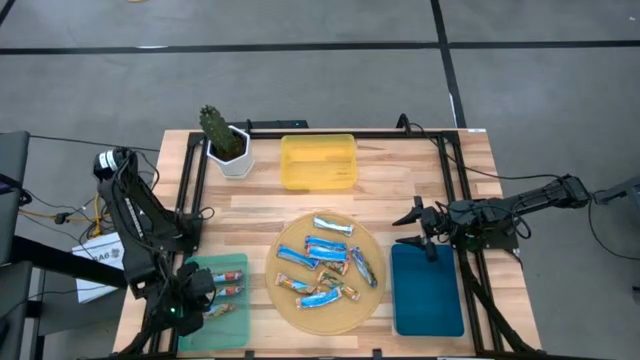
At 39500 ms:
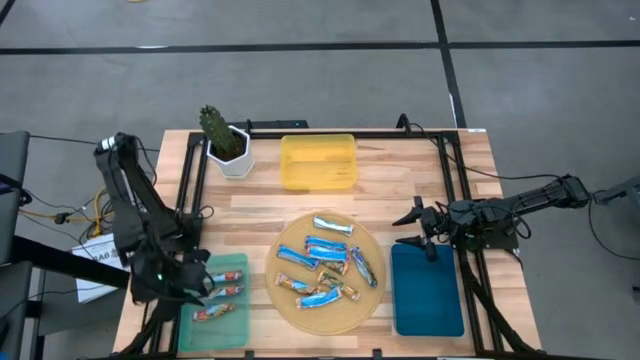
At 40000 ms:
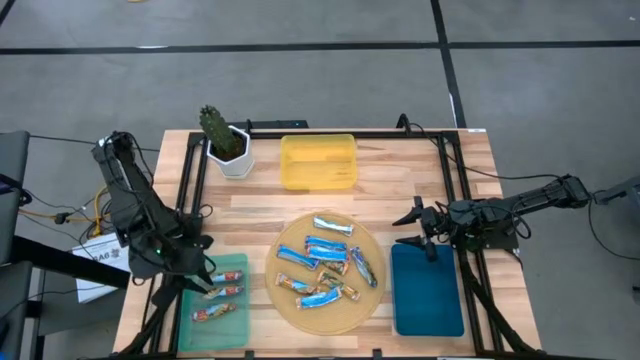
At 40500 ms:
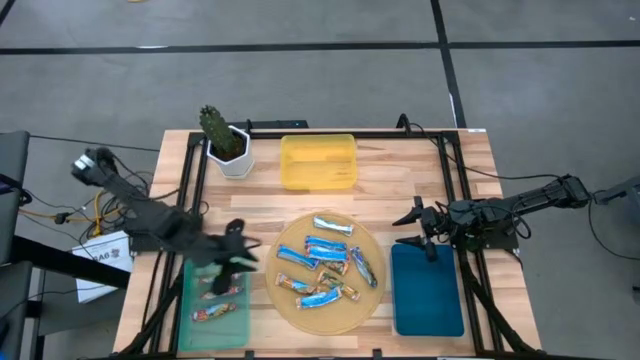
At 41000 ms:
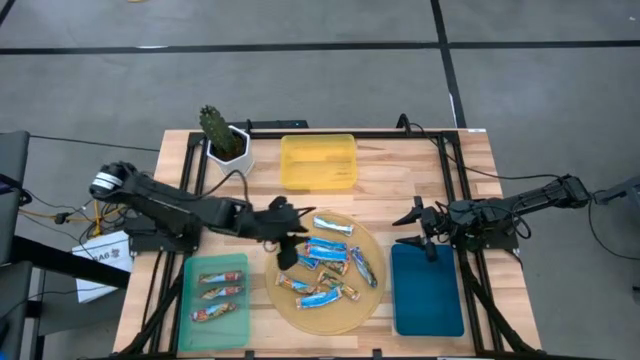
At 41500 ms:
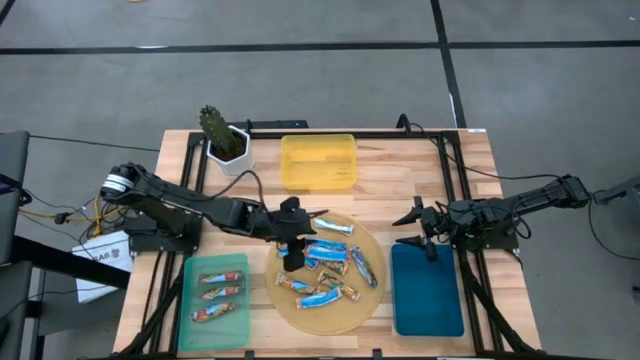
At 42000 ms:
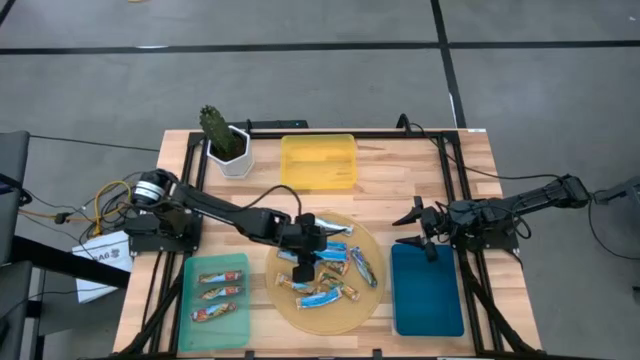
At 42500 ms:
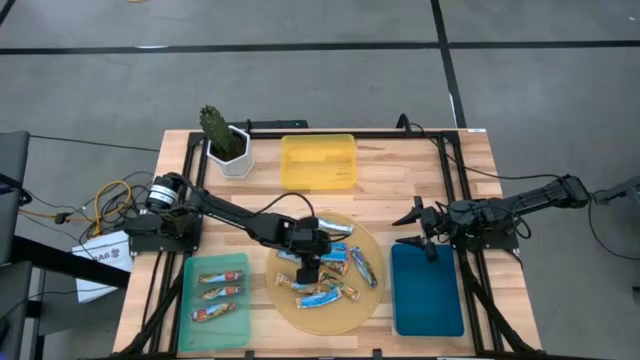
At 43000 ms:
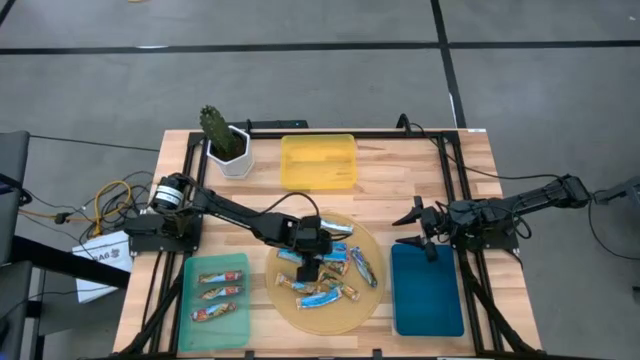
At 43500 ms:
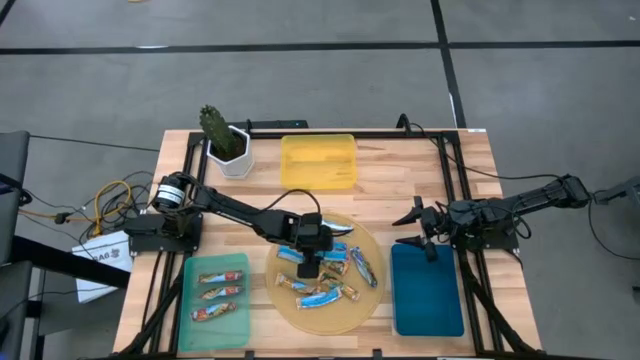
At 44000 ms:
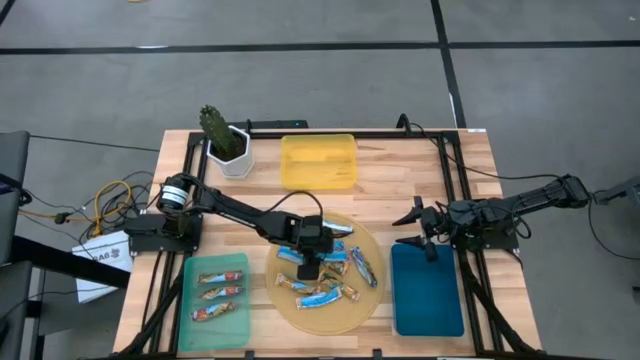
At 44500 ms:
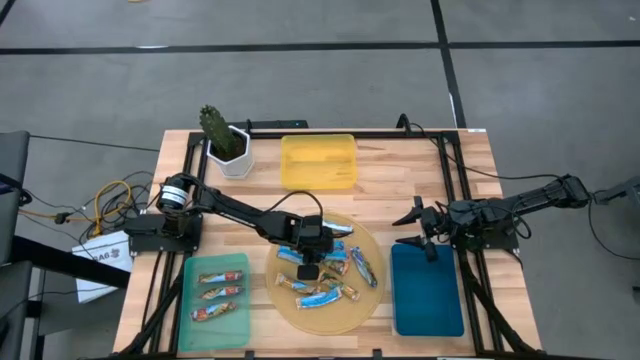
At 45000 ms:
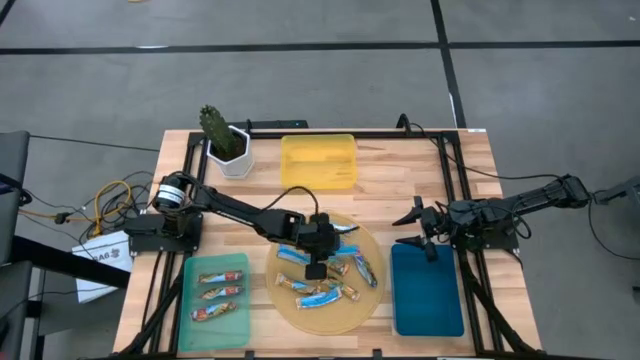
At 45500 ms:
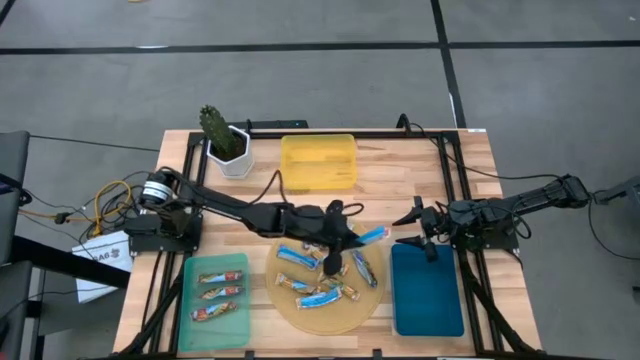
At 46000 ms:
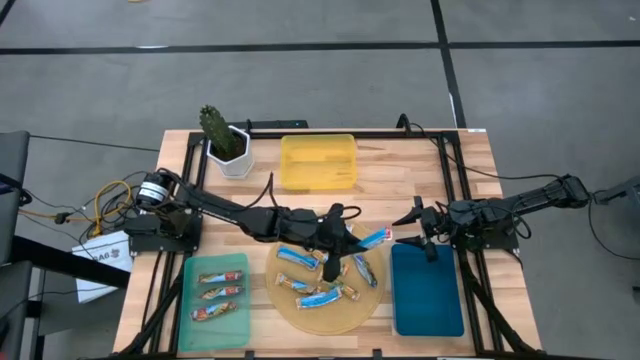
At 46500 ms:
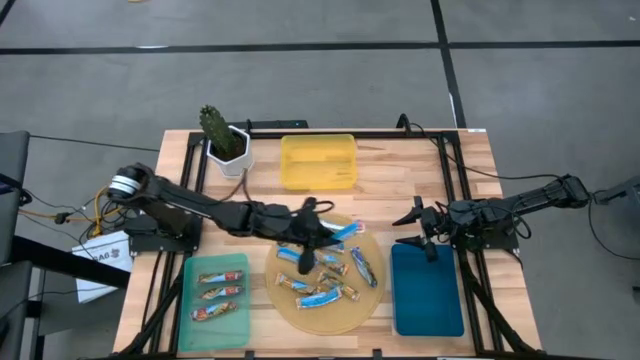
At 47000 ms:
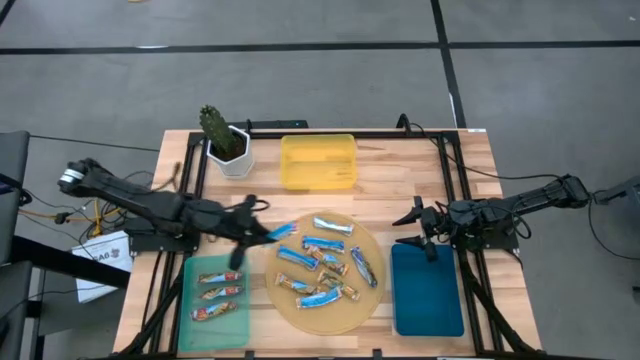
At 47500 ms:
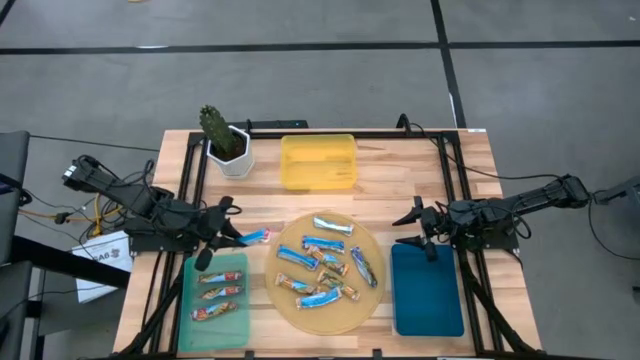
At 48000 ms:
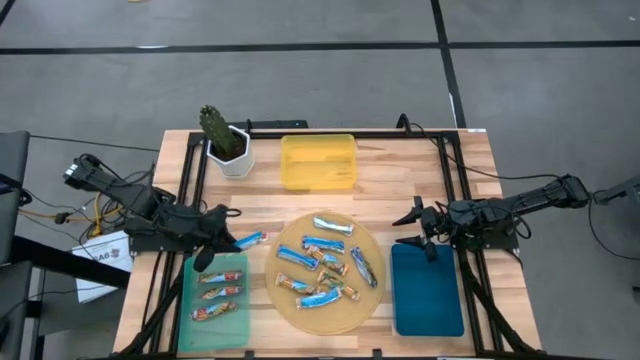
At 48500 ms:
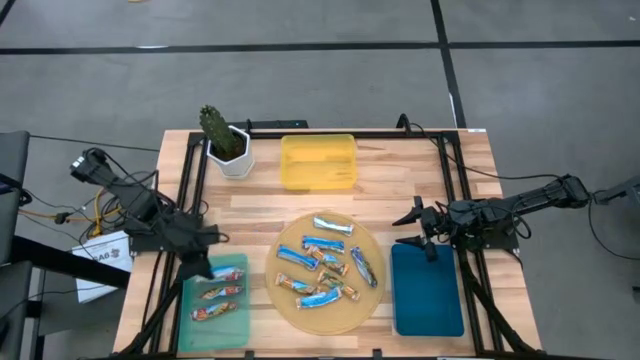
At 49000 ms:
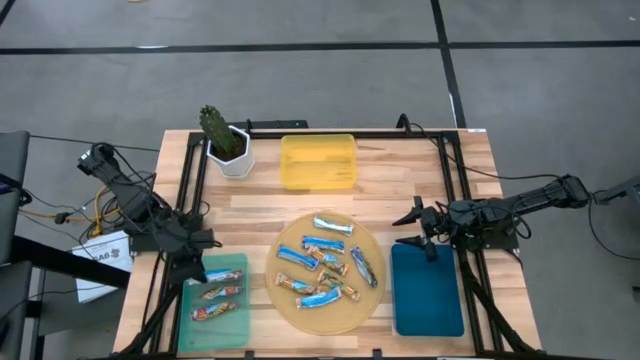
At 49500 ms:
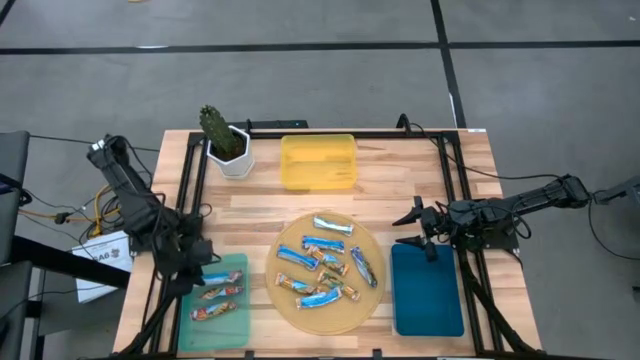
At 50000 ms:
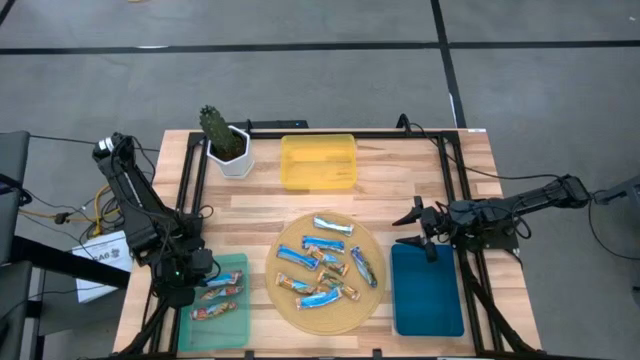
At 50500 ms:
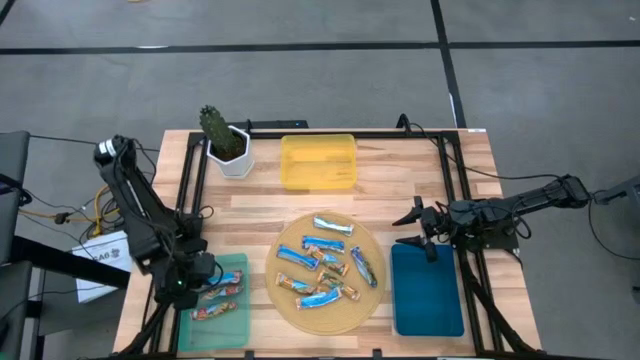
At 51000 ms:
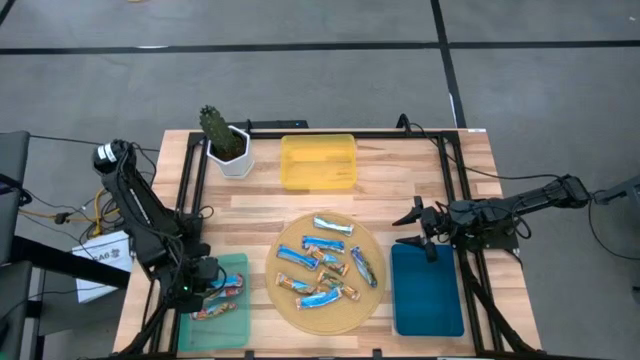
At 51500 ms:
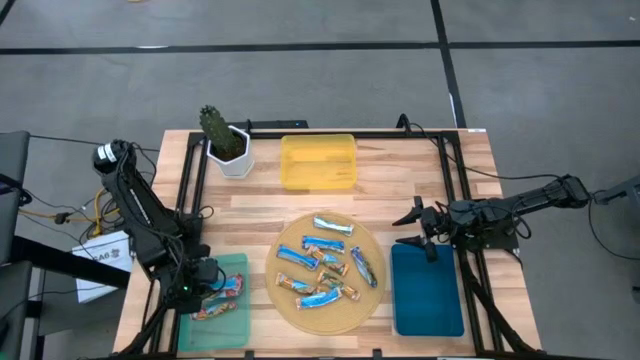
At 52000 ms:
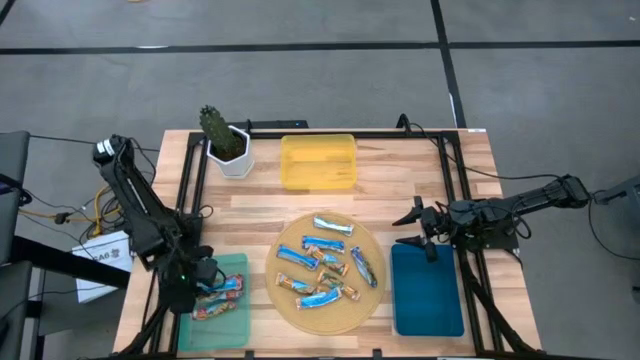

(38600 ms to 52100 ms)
Task: Pick and place Granola Bars by type
Put the red granola bar into the light blue bin

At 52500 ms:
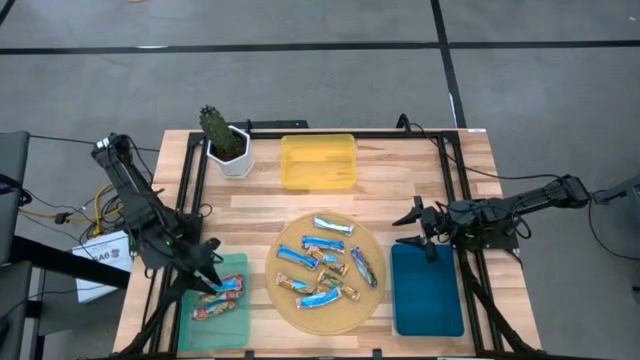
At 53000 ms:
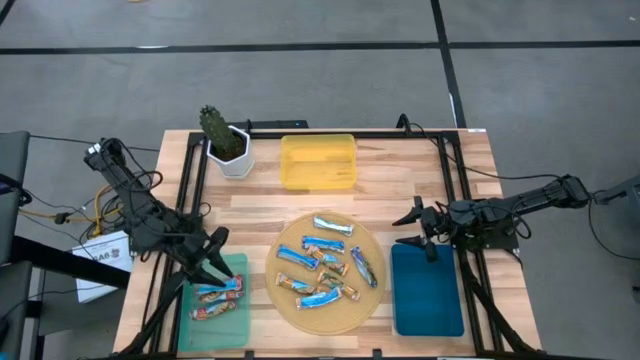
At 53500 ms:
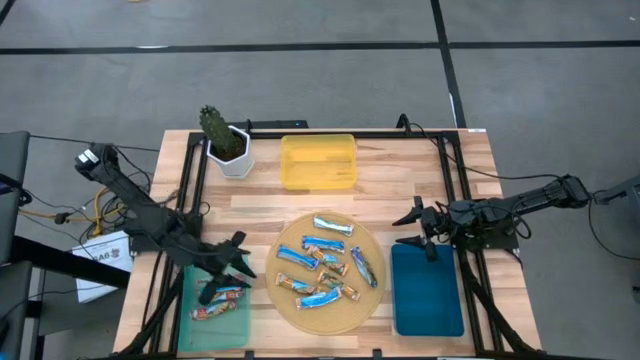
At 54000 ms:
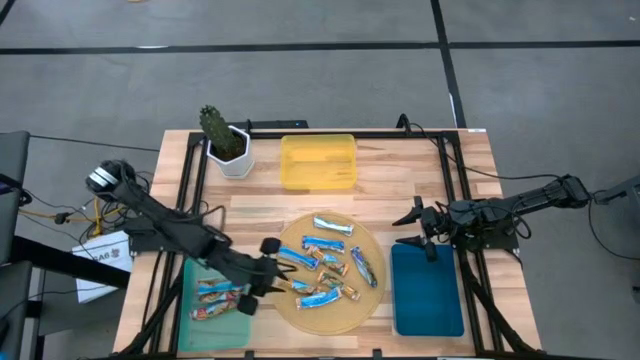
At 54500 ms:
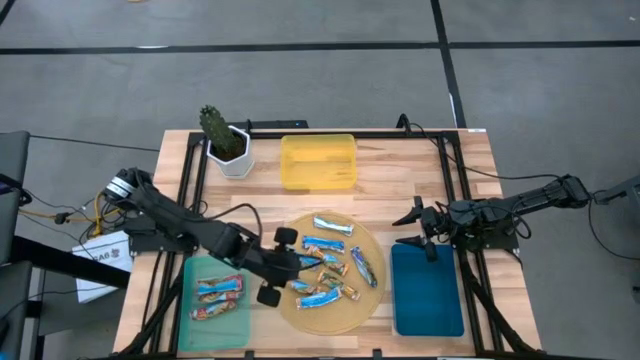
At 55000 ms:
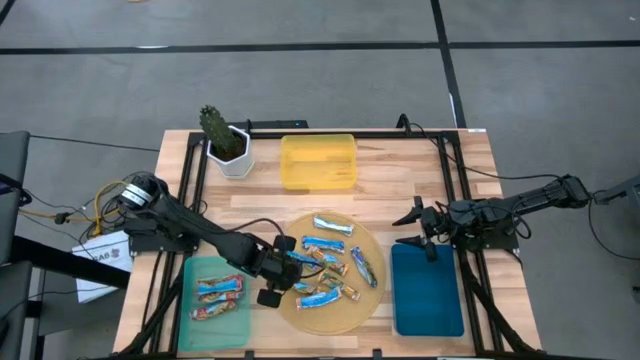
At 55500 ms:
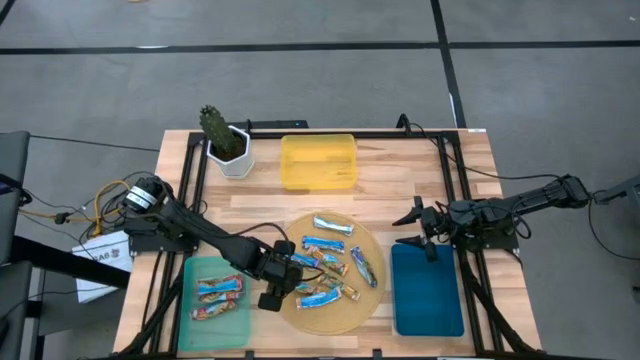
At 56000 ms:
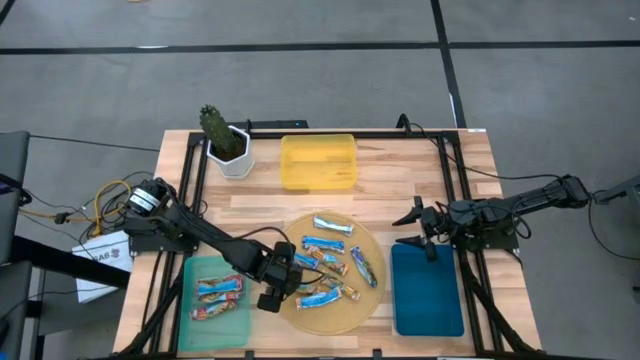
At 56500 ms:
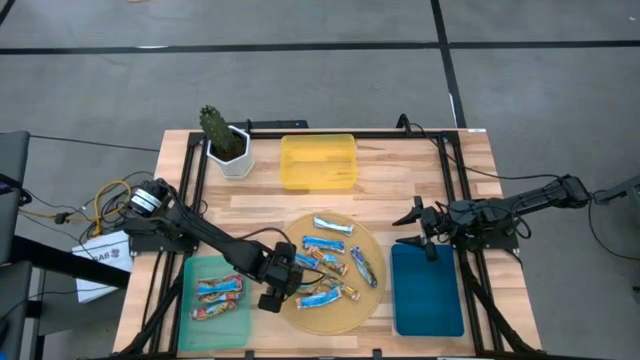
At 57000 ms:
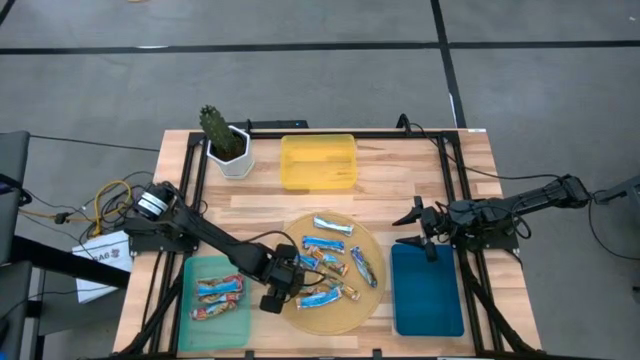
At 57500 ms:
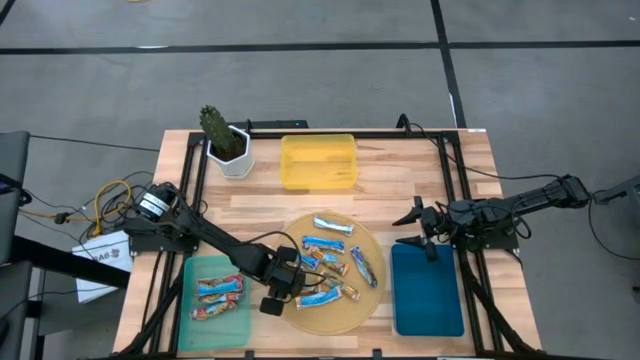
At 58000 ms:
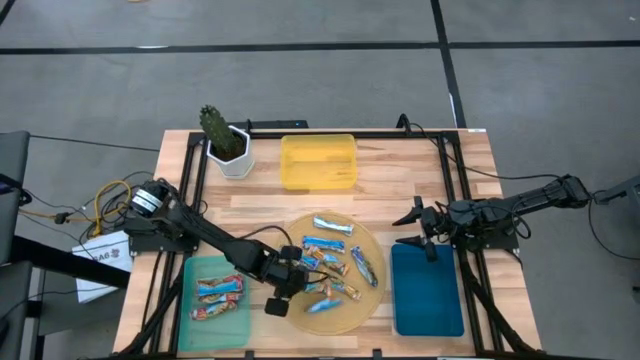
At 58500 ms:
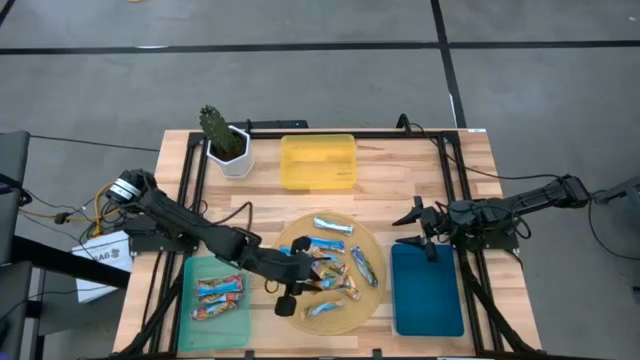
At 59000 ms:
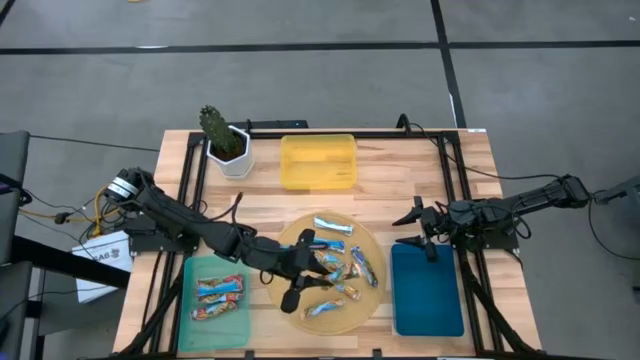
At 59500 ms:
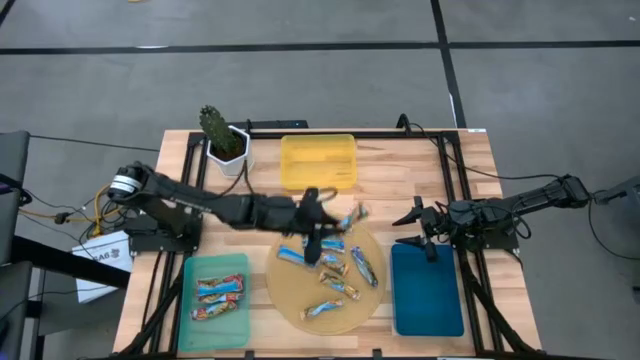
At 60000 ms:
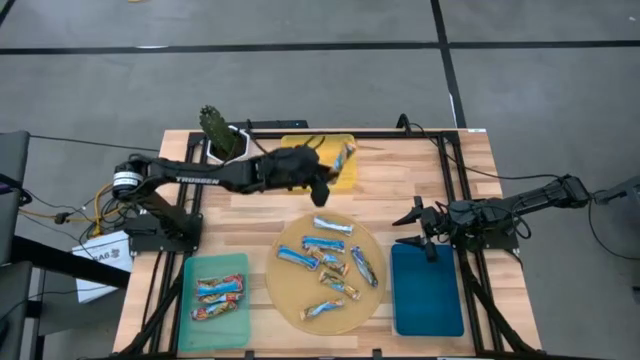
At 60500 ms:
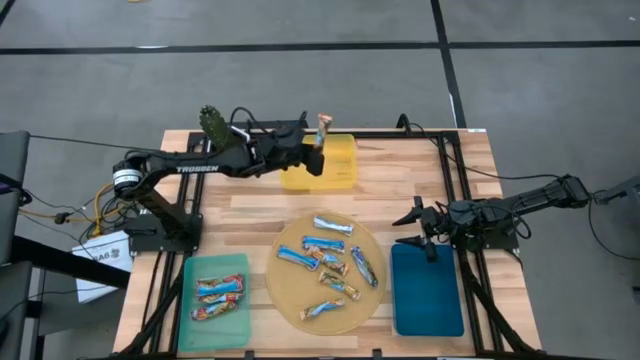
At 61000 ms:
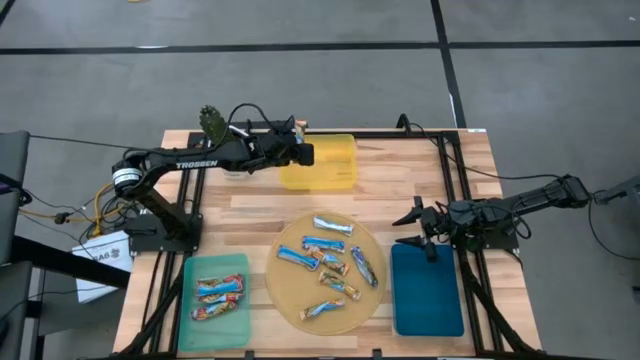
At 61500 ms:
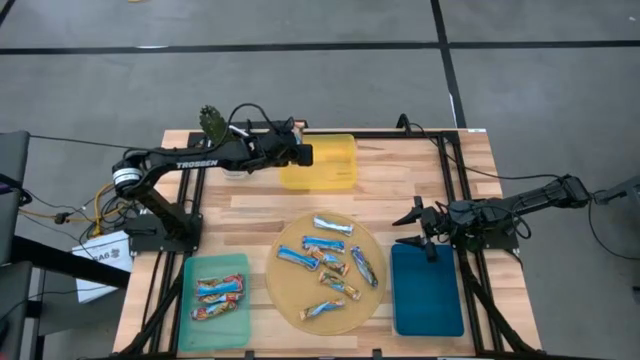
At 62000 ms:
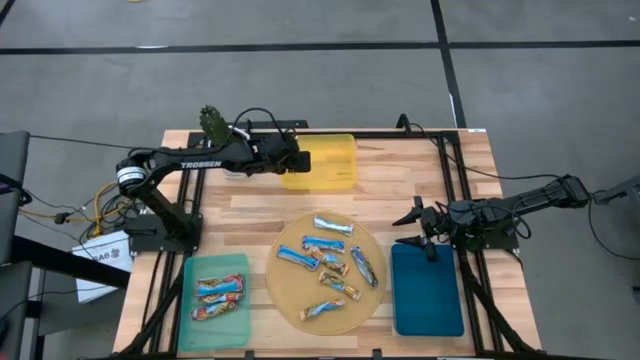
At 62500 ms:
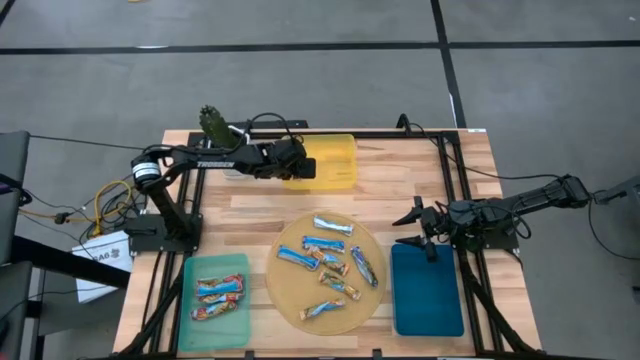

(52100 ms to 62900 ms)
Put the yellow granola bar into the yellow bin
